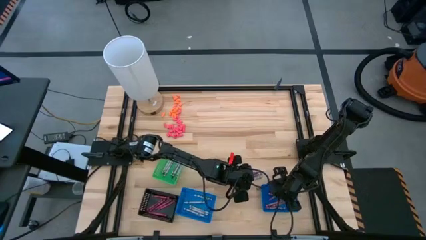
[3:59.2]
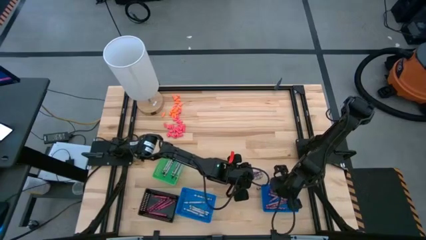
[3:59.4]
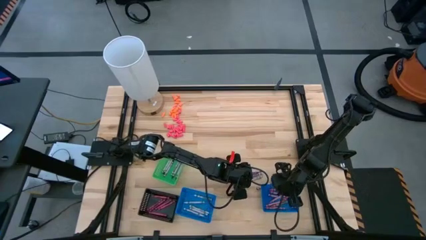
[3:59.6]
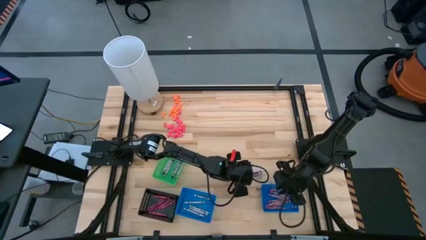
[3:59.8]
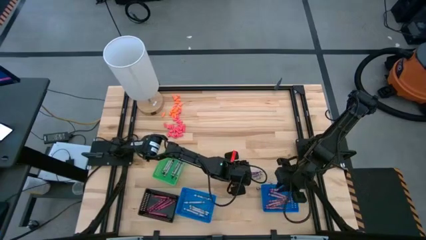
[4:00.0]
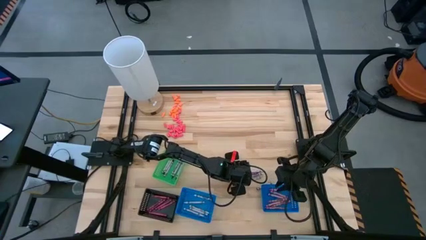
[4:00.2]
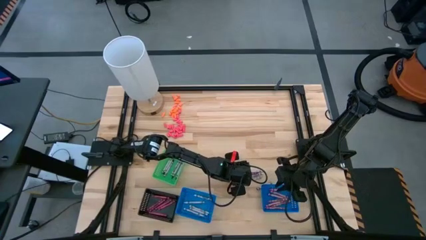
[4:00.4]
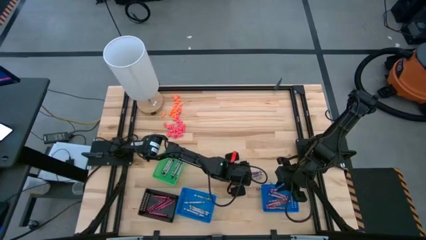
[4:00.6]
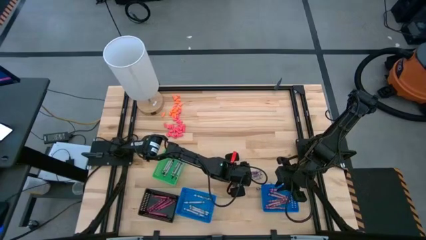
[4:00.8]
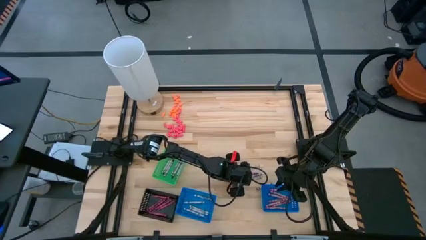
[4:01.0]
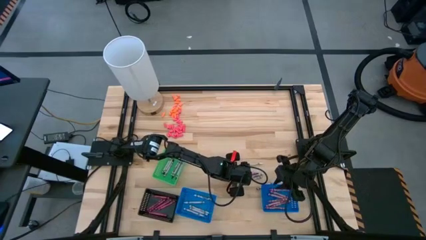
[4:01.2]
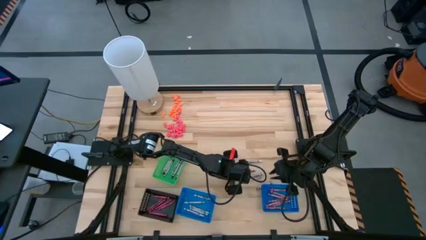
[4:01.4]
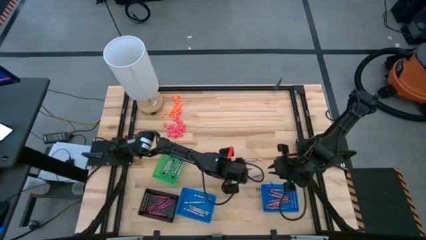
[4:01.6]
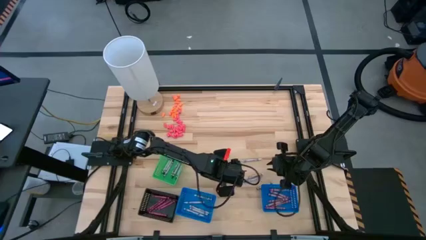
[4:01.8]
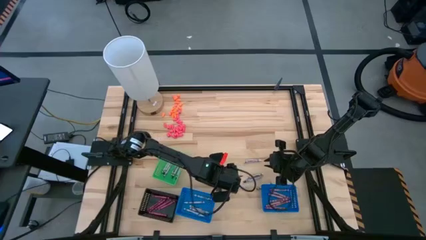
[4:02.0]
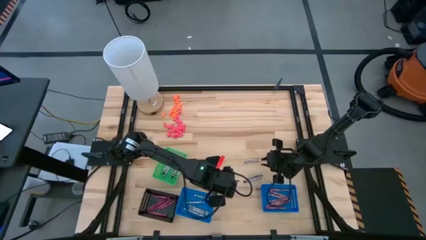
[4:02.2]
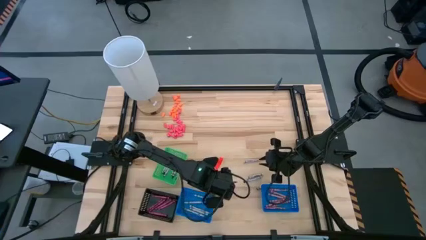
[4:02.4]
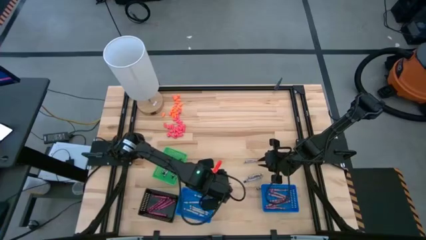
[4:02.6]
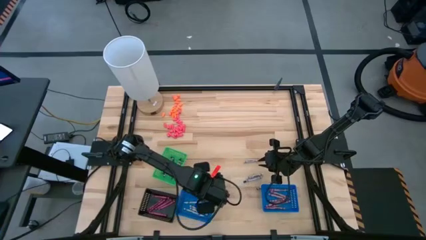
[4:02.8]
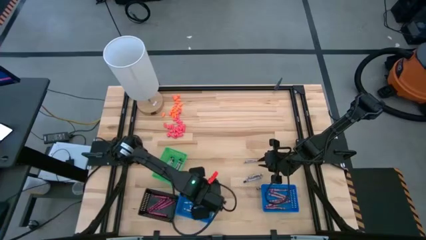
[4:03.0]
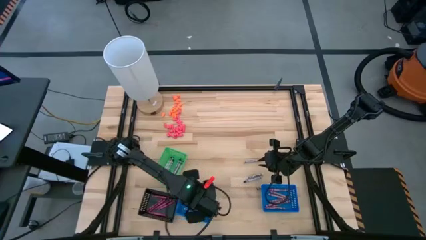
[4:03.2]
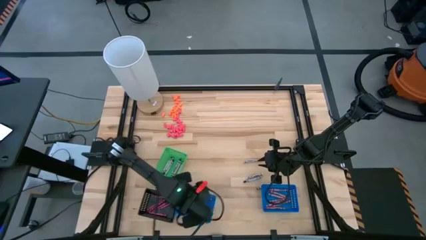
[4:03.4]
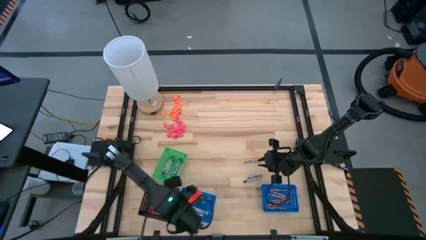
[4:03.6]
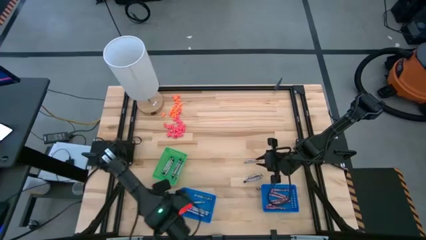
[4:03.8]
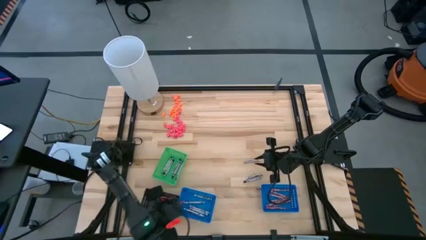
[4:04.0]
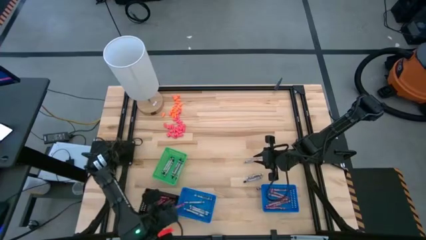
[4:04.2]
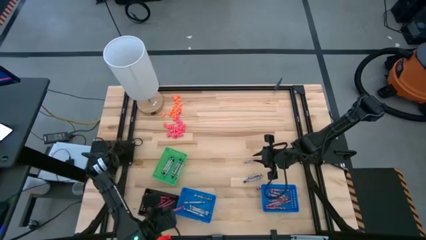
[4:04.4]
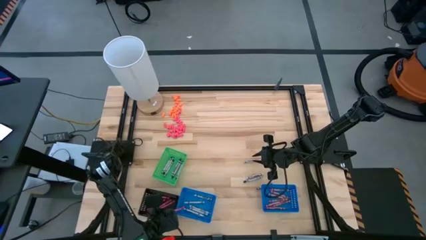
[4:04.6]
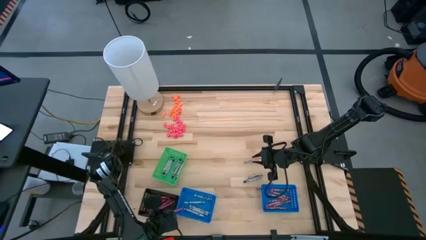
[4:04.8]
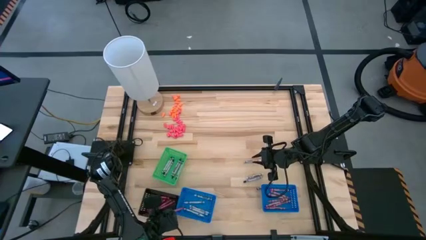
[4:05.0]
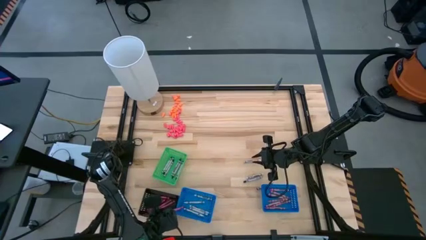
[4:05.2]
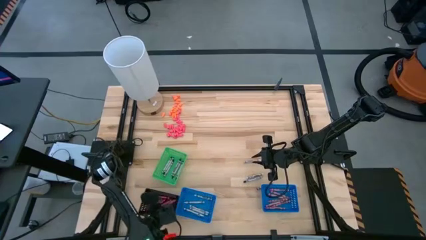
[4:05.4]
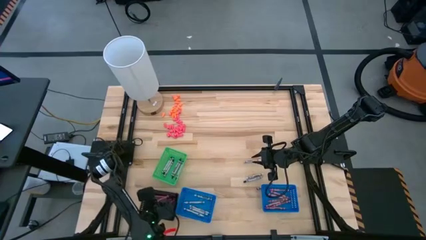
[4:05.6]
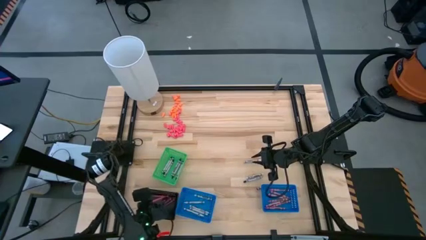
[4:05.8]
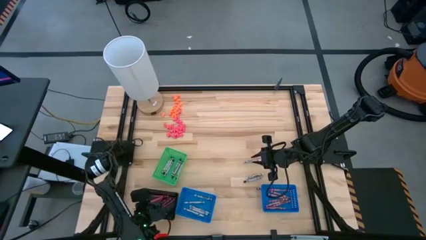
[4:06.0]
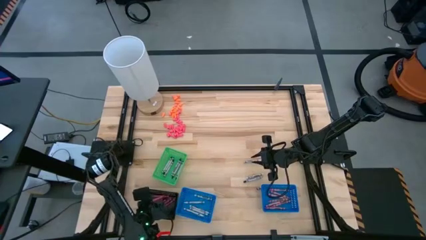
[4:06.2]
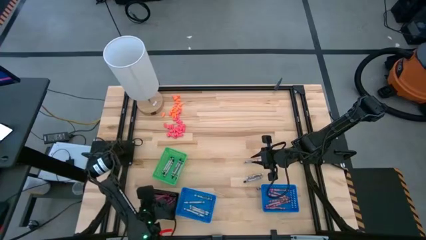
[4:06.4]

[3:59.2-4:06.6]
Task: Sort crayons
Put the red crayon into the black basket

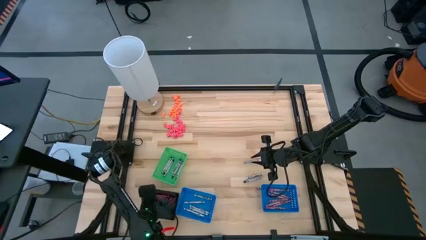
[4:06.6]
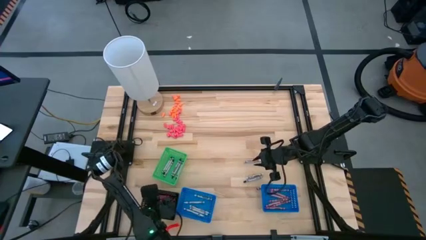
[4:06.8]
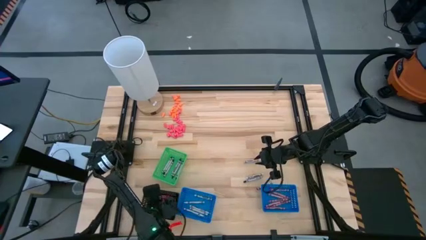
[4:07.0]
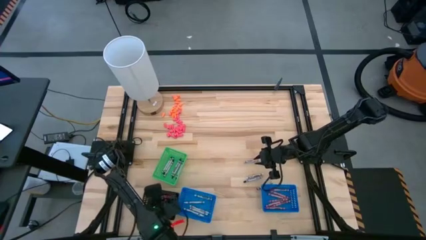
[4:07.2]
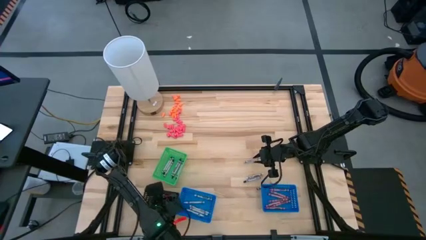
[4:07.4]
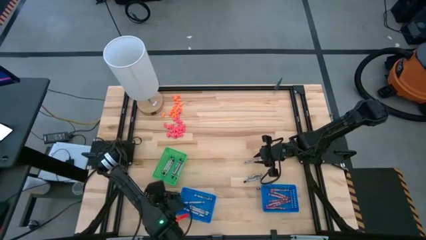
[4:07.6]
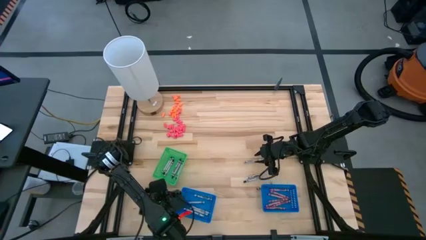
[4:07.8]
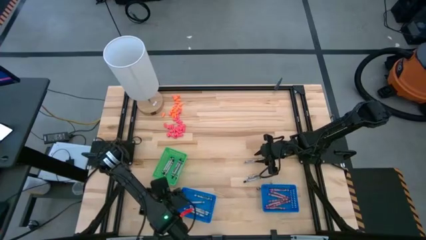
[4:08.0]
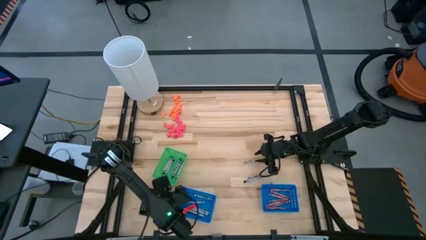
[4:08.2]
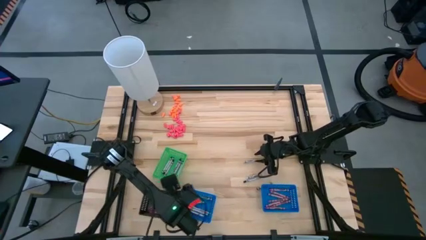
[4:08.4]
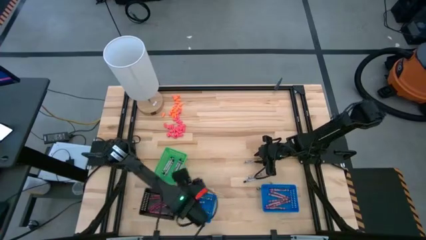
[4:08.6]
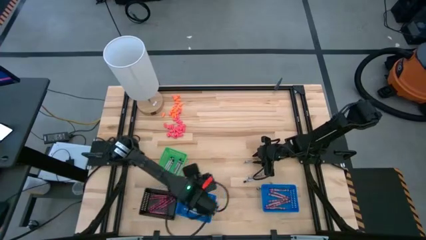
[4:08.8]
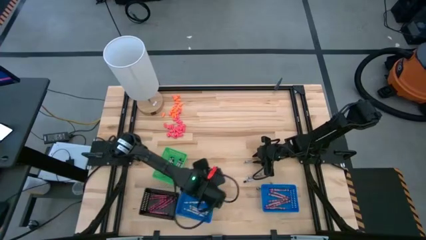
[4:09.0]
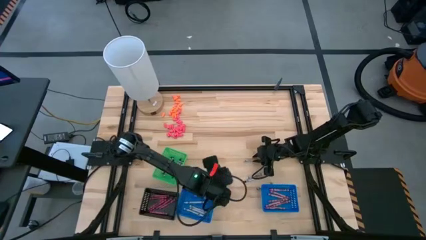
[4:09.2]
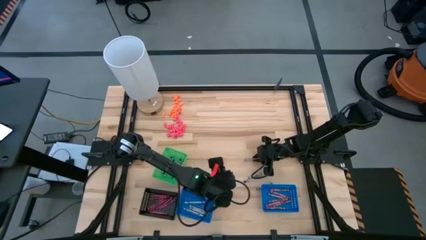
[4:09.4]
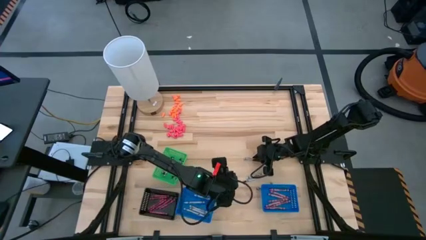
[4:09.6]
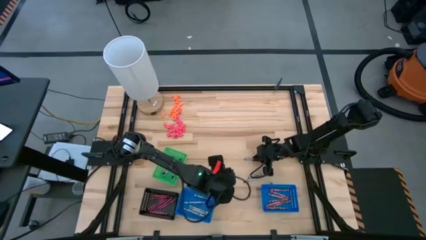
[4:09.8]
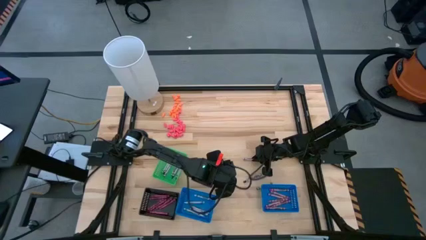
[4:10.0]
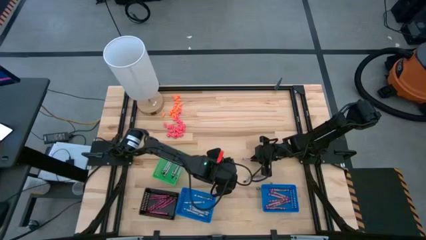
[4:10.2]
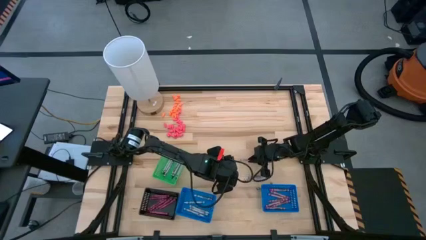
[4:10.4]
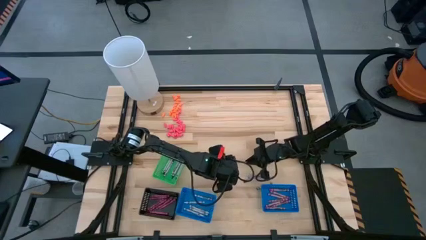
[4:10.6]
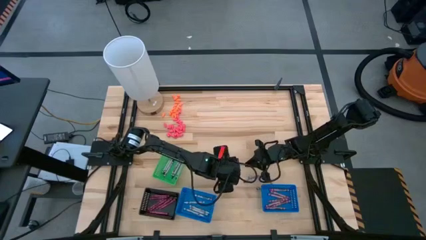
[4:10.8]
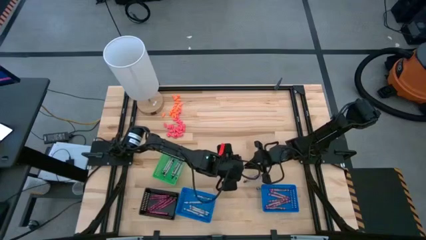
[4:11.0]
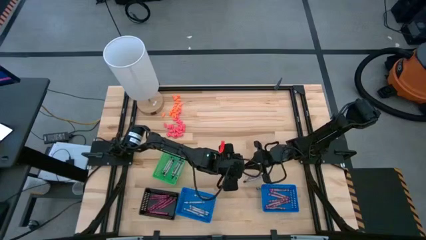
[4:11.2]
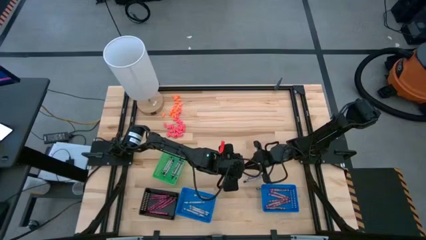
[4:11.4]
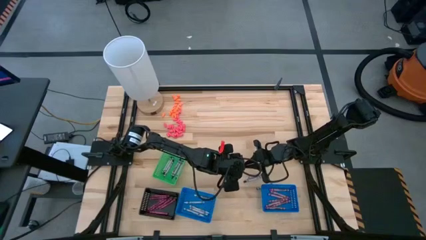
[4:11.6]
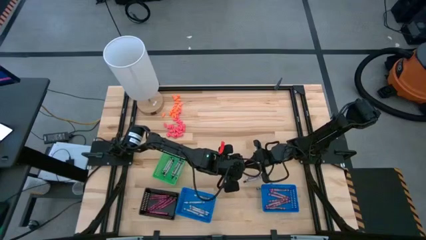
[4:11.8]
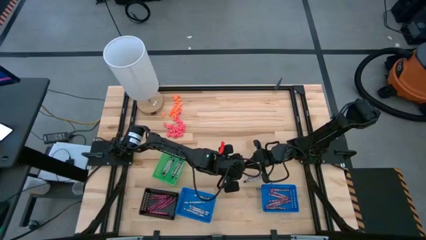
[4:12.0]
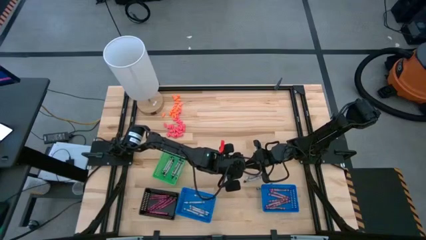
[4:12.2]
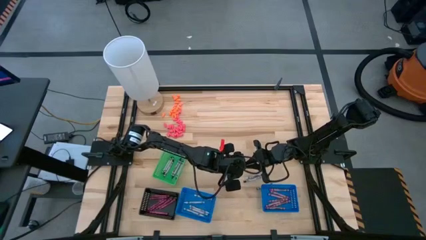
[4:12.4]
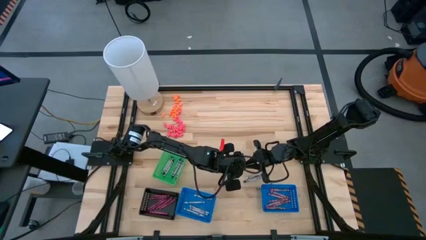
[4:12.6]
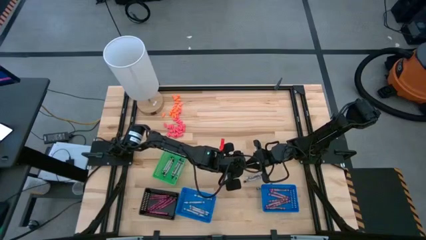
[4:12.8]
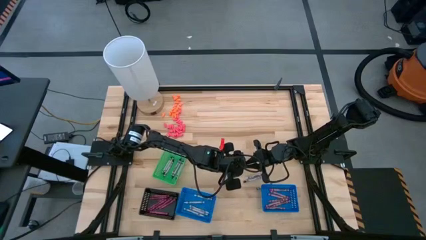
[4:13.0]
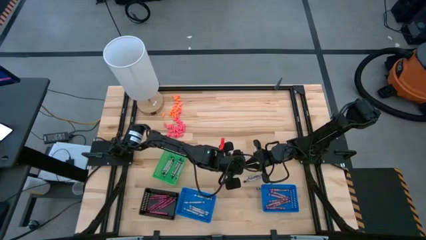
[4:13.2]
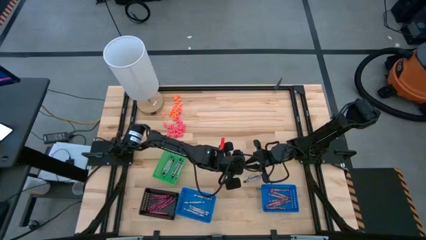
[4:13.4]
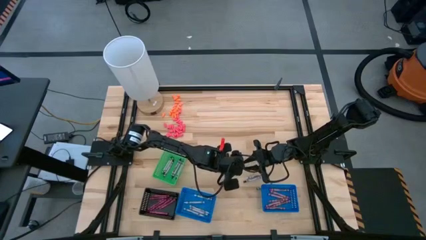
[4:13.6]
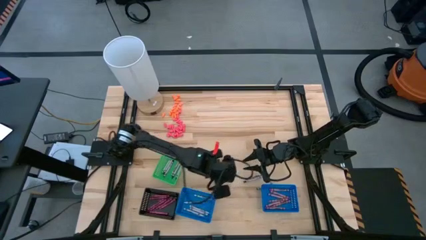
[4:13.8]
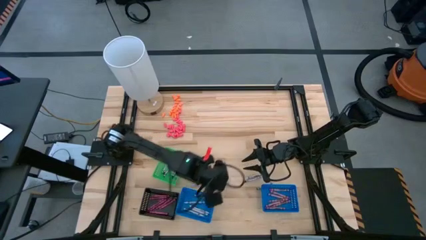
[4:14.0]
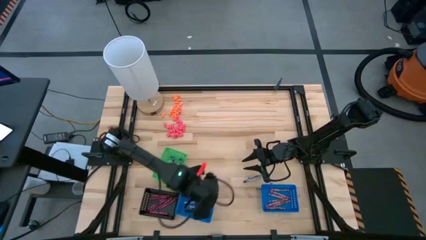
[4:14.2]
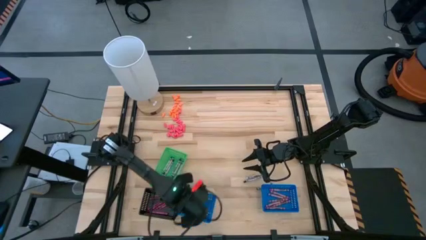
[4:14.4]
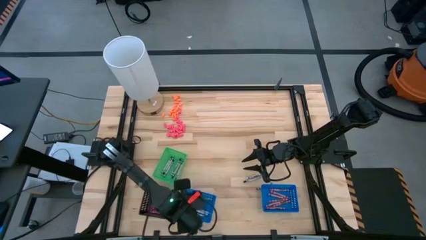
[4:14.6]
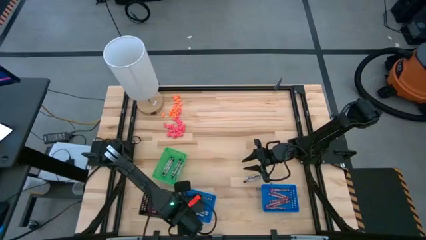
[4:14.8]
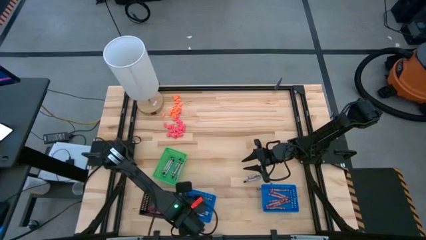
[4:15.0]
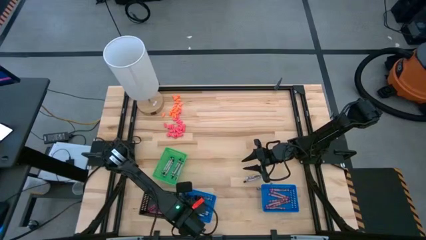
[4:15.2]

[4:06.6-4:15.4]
Put the white crayon into the left blue basket
